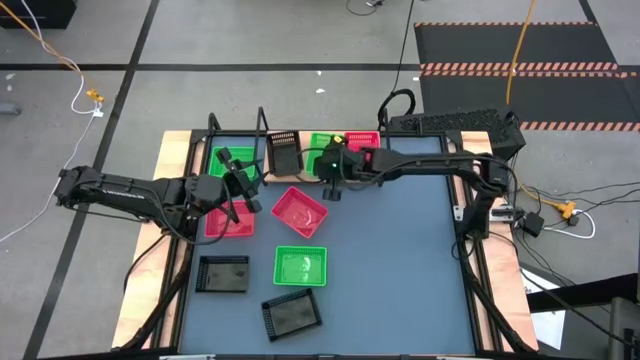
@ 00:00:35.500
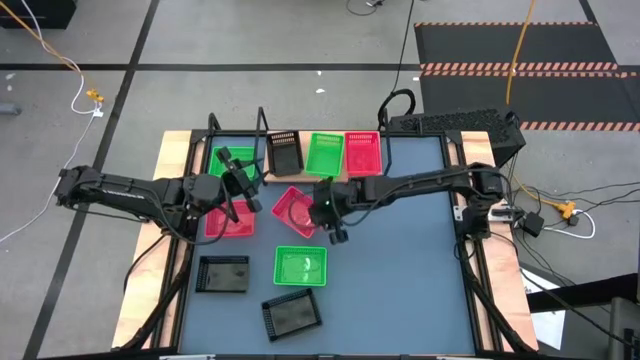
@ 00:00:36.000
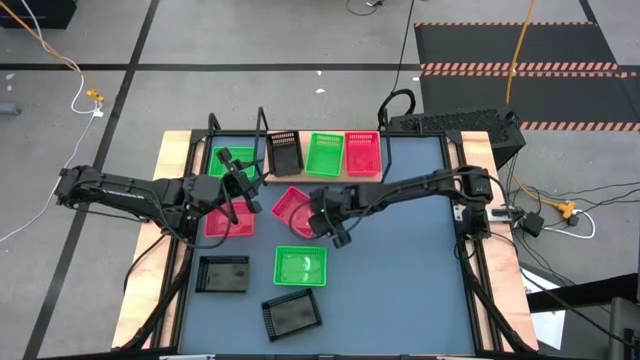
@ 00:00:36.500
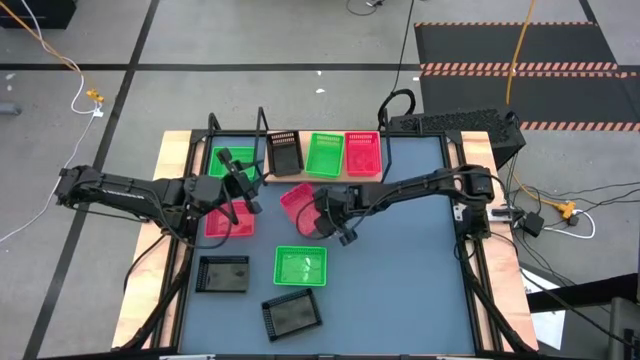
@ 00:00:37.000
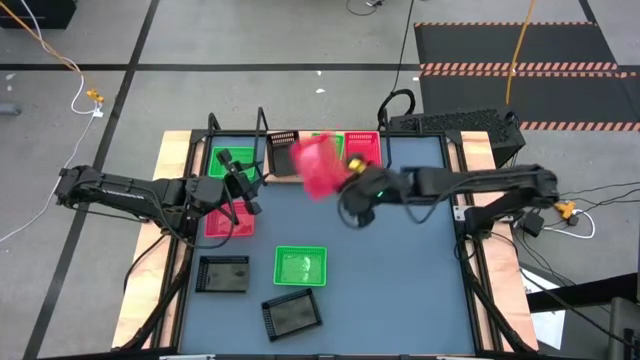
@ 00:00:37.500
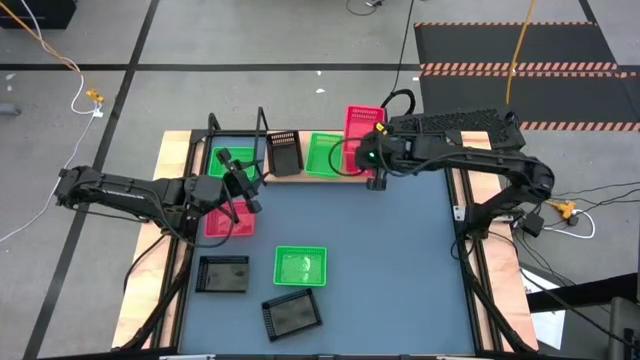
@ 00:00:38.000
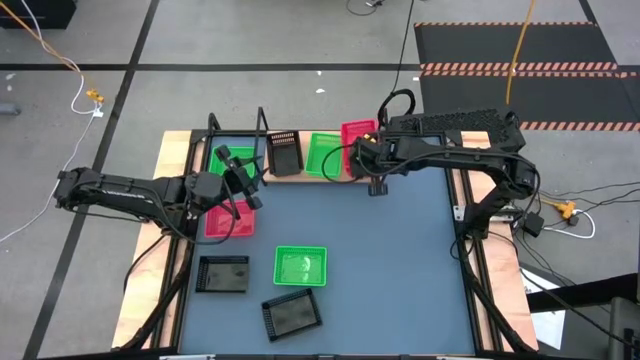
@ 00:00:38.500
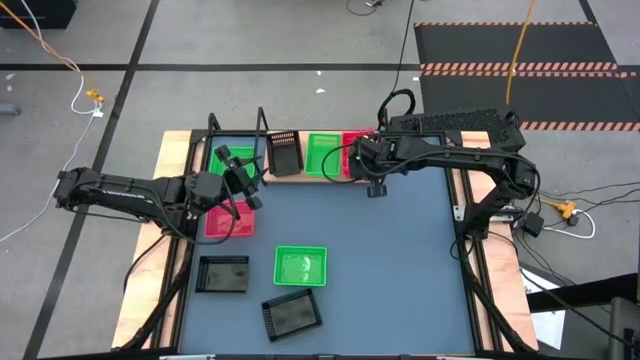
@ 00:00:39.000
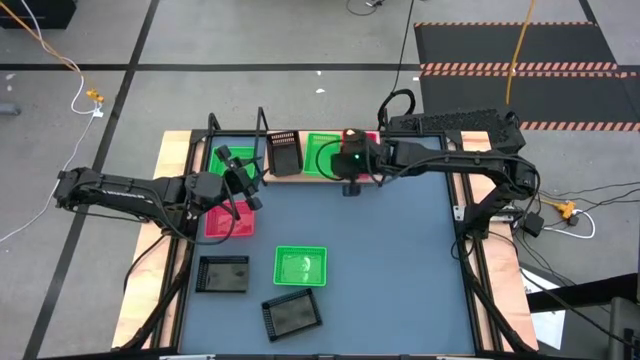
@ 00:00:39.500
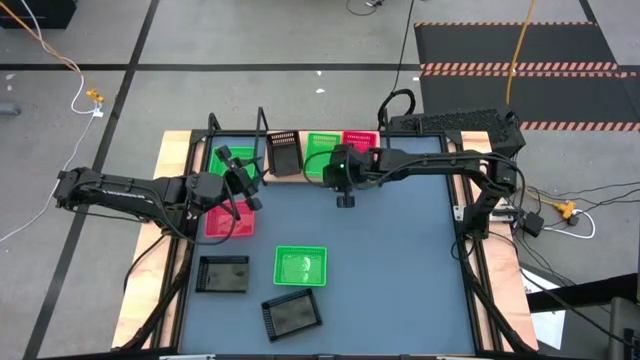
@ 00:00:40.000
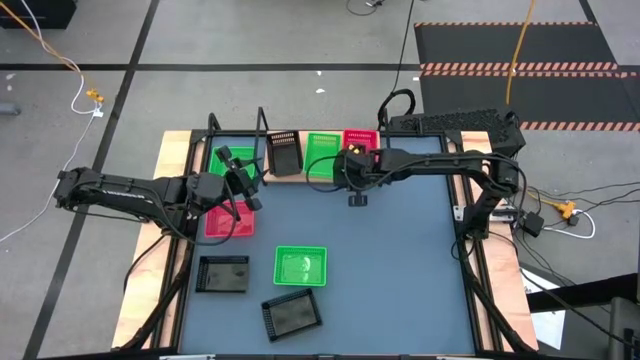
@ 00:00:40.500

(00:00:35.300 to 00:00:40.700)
Task: Stack baskets on shelf by color
Stack the right red bin on top of the red bin on the shelf

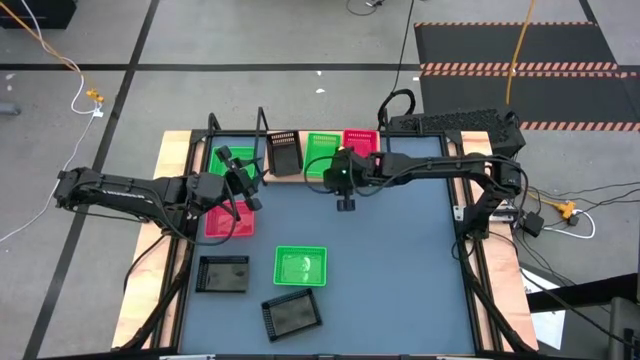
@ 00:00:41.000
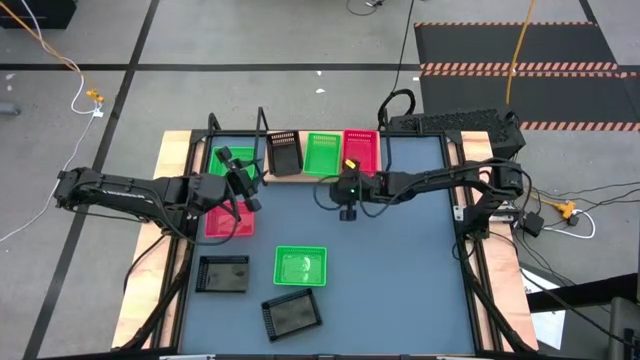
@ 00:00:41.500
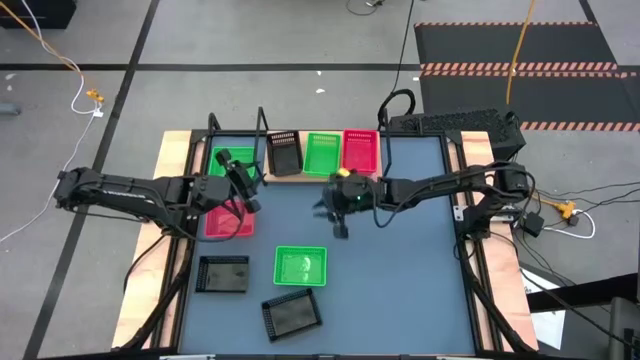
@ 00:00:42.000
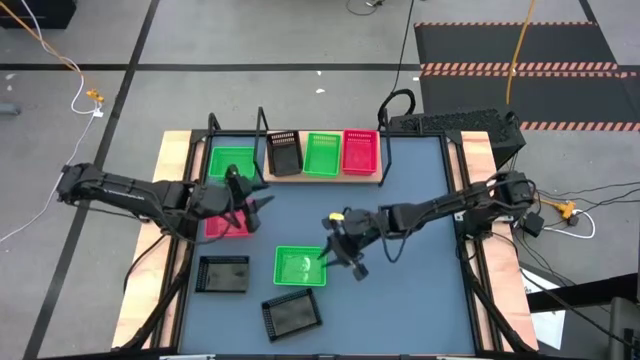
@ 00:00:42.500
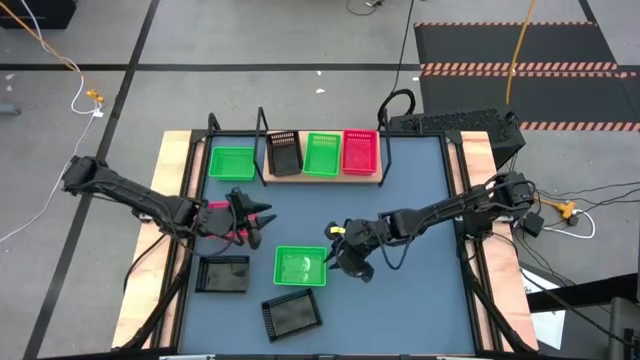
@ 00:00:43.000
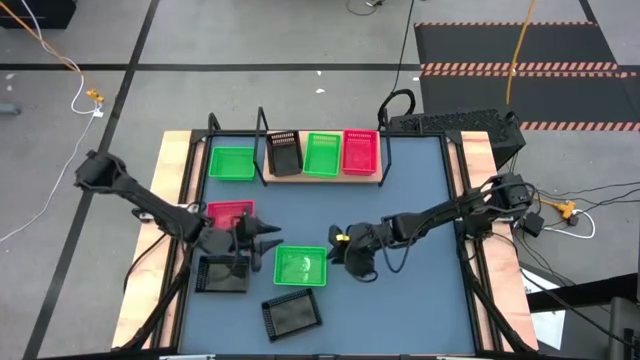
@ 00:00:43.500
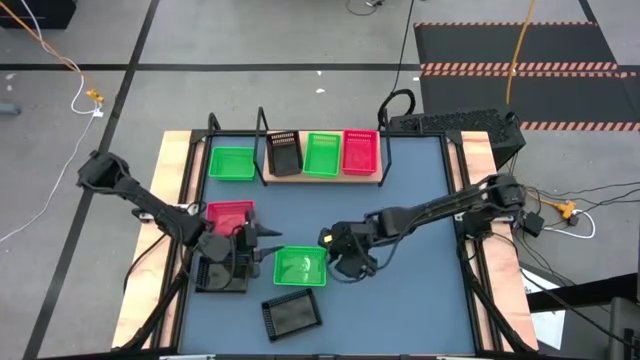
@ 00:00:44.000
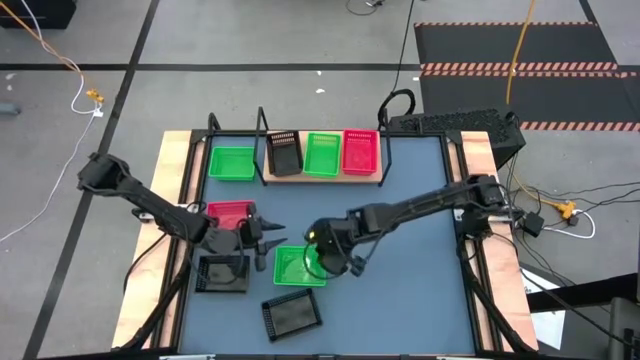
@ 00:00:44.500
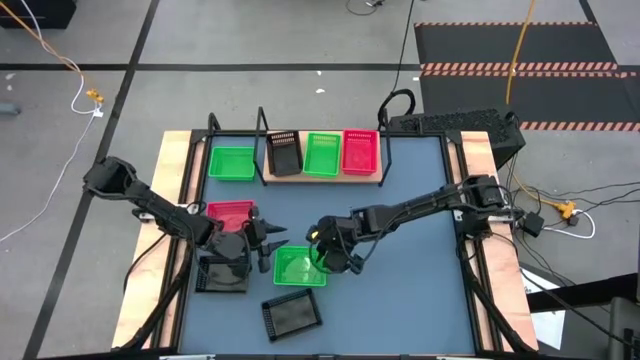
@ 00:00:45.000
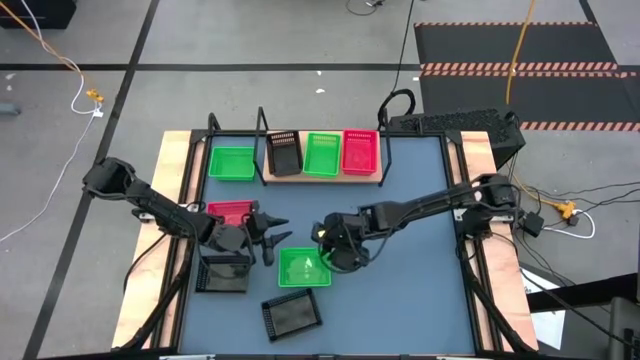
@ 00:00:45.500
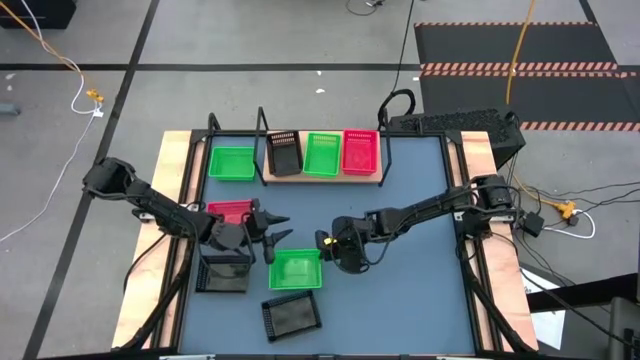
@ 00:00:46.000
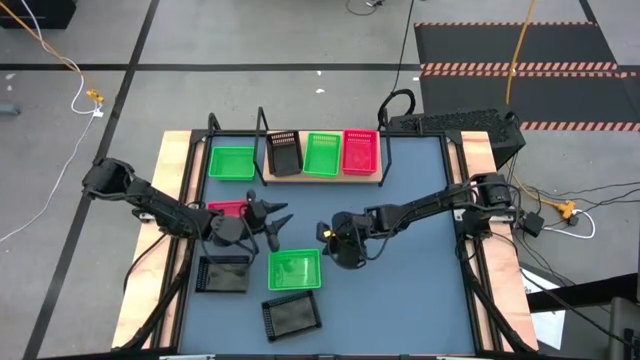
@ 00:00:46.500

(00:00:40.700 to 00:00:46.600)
Stack the bottom green bin on top of the green bin on the shelf

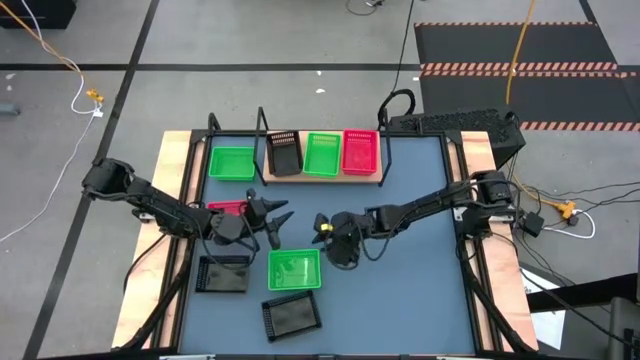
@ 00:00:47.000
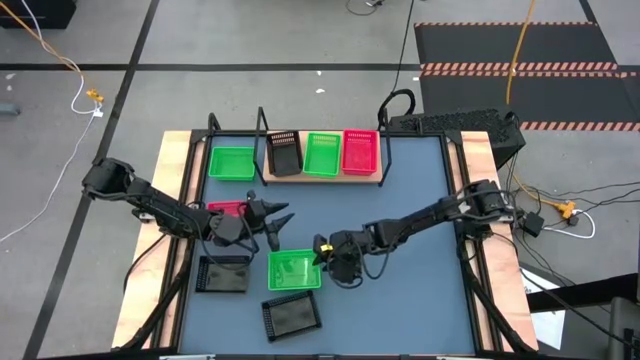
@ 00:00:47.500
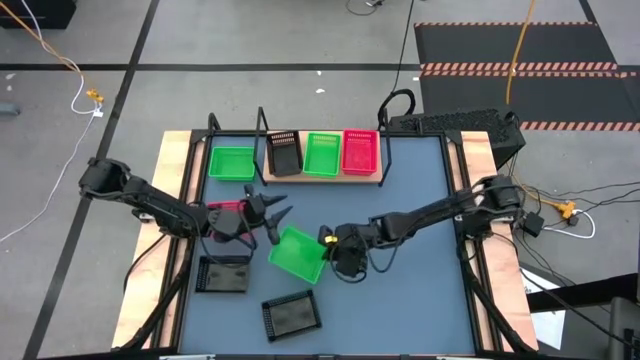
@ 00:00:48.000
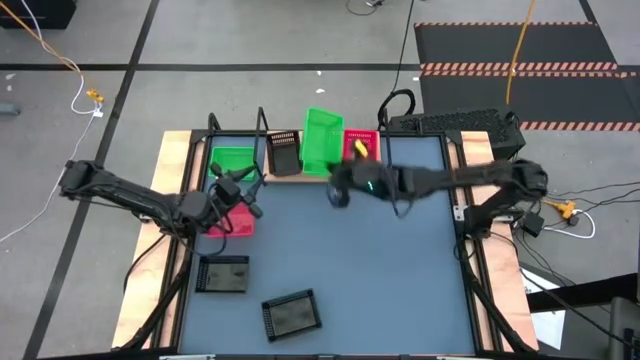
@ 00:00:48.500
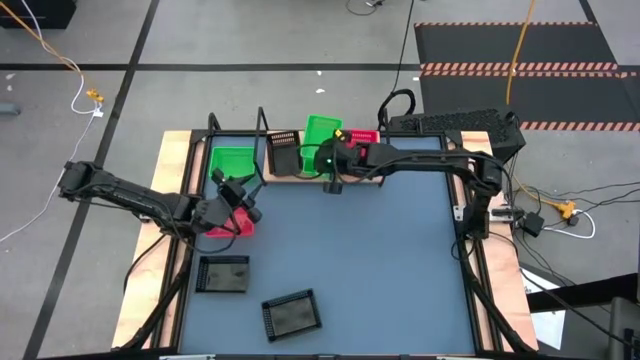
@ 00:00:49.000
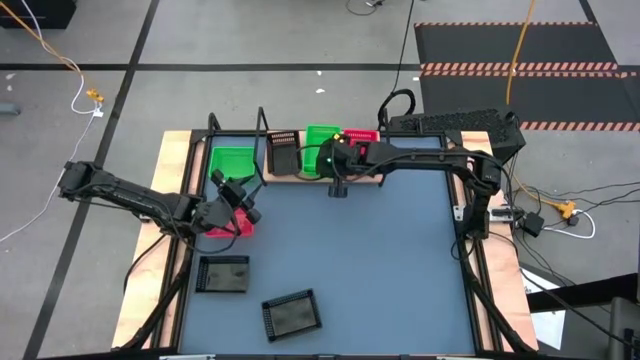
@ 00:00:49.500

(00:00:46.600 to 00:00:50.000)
Stack the bottom green bin on top of the green bin on the shelf

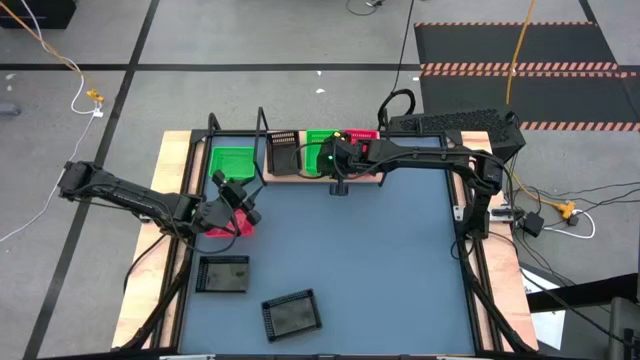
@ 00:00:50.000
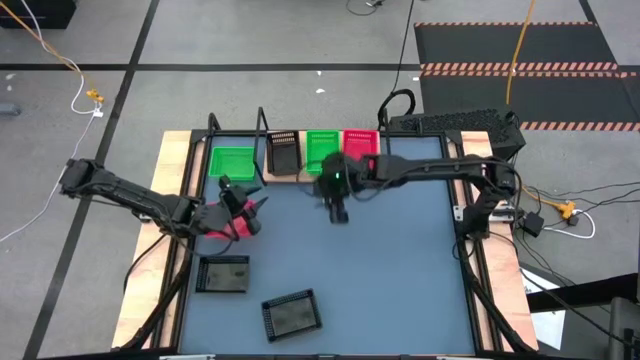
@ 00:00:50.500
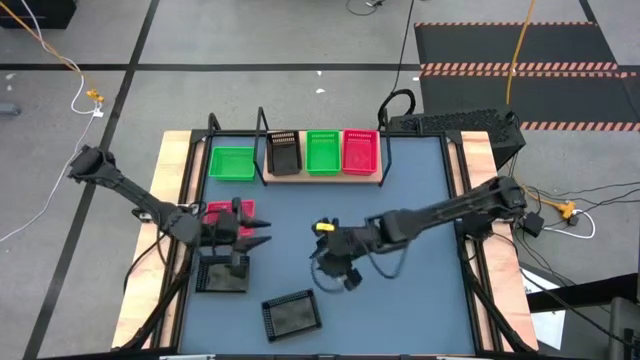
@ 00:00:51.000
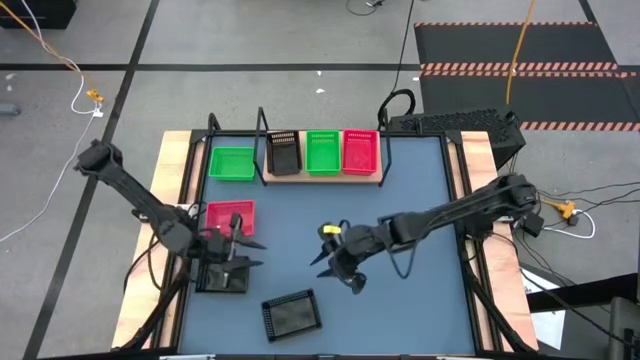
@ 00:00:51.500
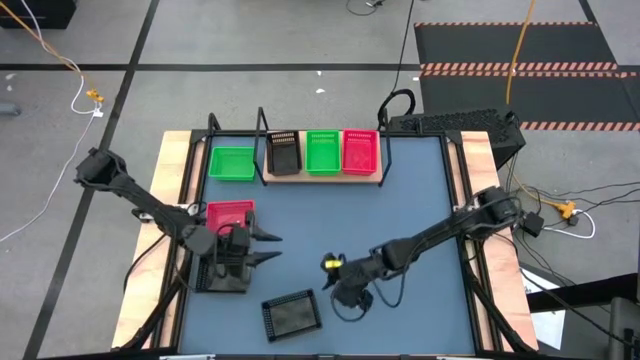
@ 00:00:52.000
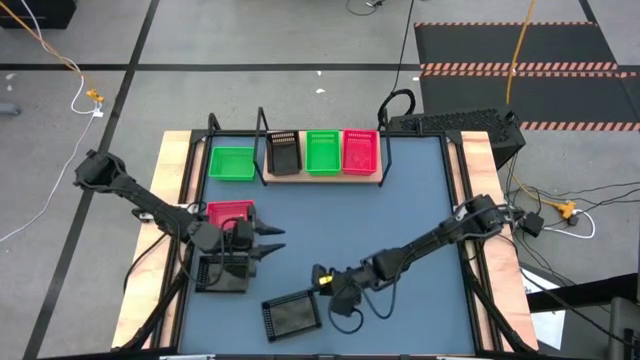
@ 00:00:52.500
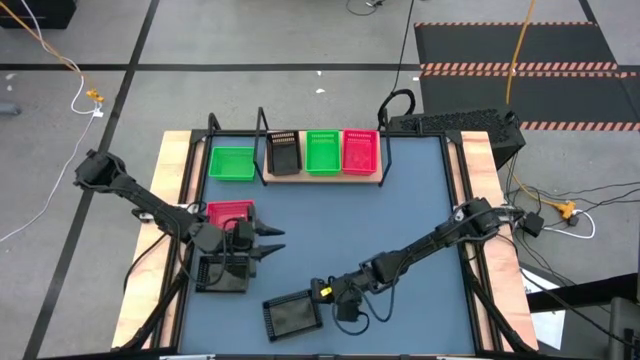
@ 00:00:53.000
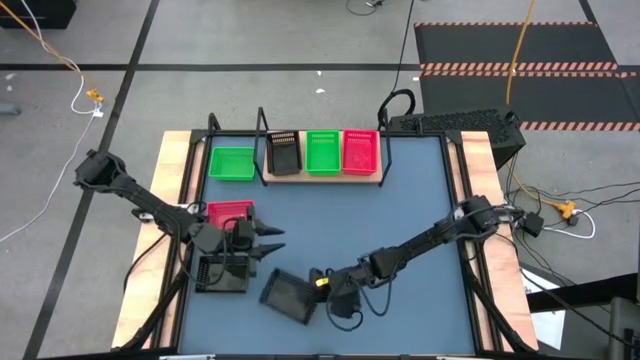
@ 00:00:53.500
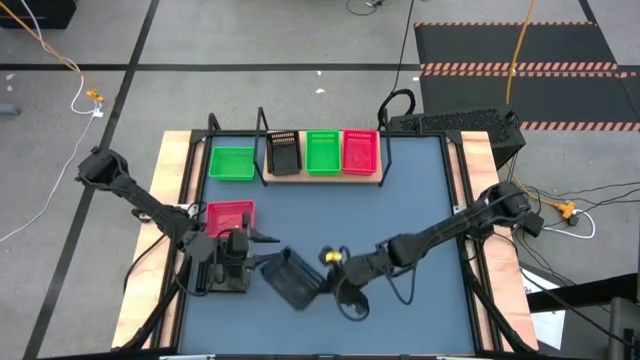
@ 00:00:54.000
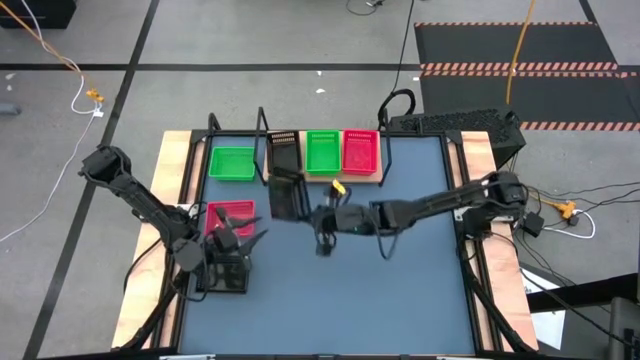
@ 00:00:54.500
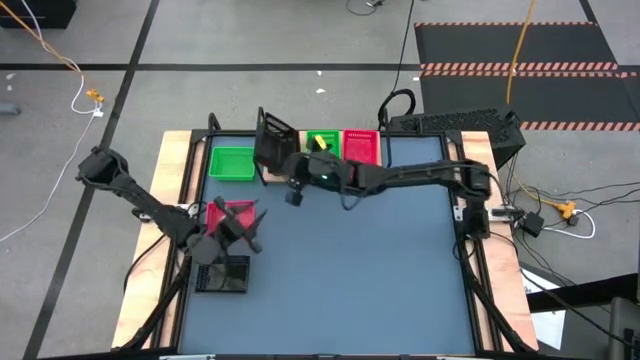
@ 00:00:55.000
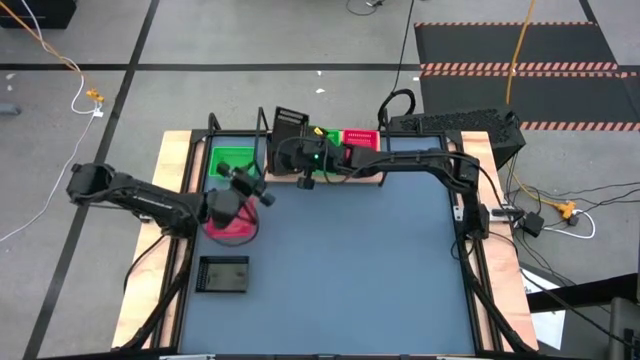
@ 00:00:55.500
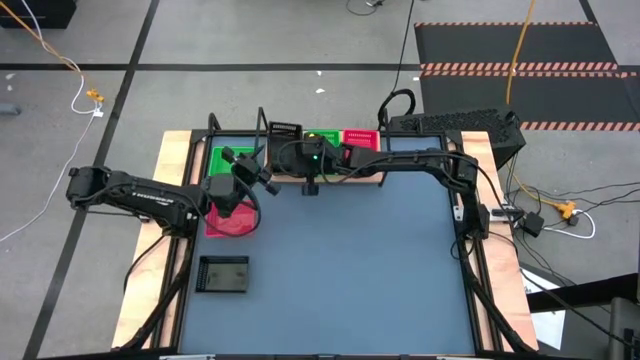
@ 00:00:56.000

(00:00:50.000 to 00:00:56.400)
Stack the bottom black bin on top of the black bin on the shelf
